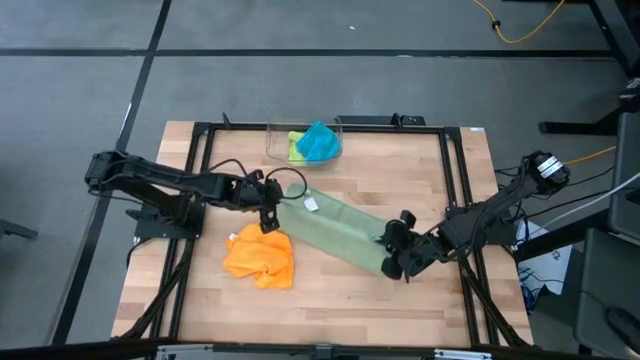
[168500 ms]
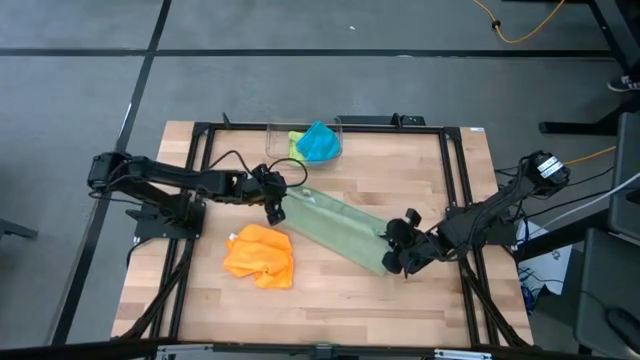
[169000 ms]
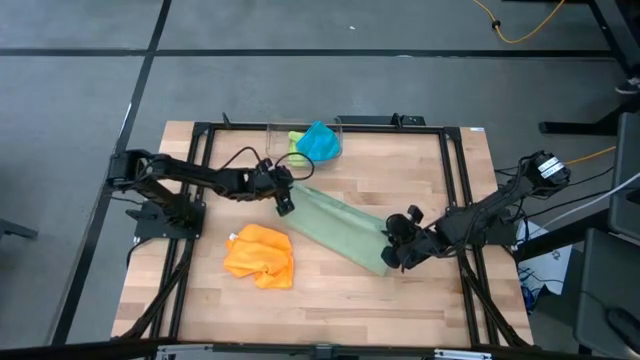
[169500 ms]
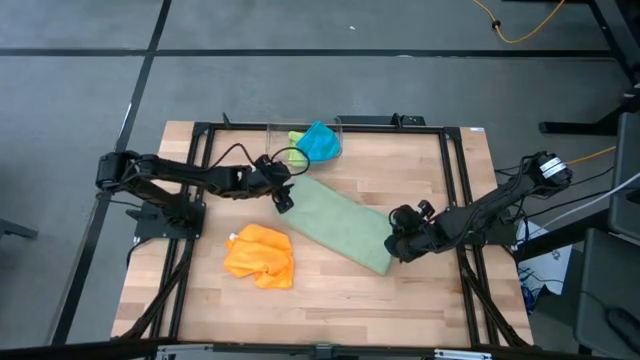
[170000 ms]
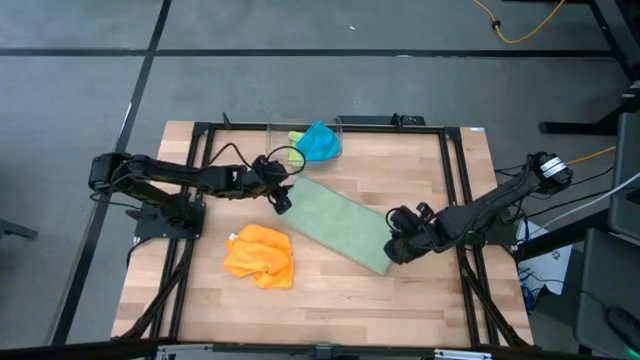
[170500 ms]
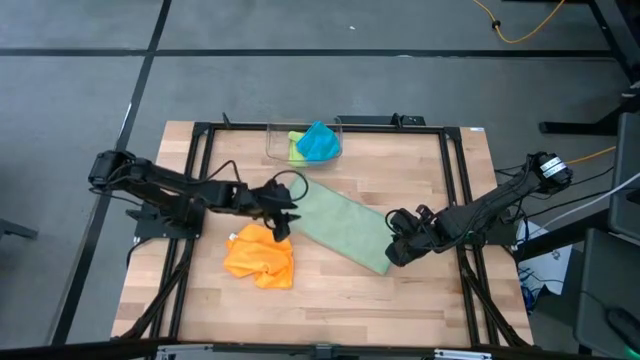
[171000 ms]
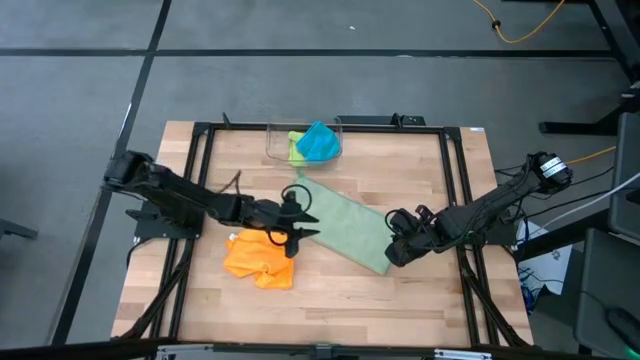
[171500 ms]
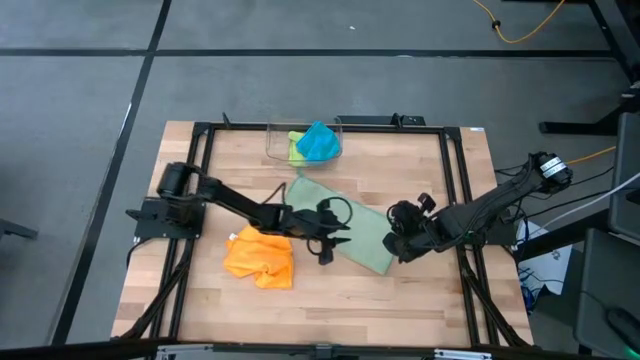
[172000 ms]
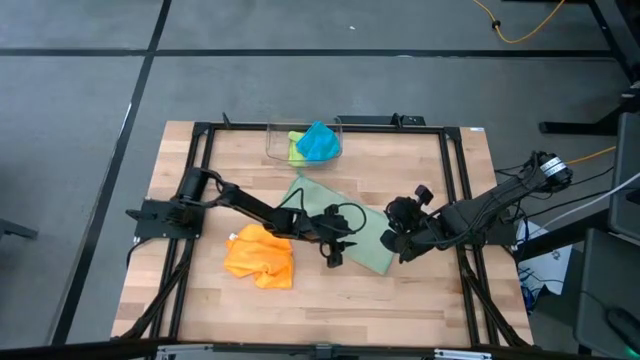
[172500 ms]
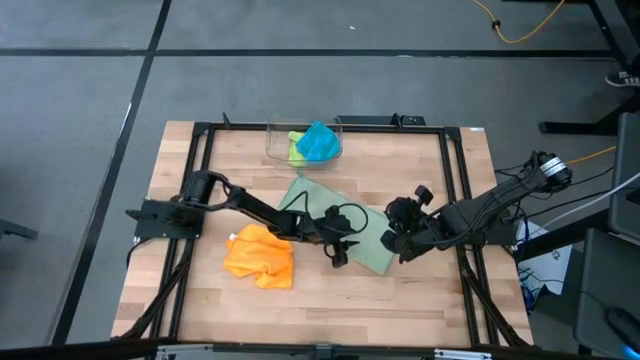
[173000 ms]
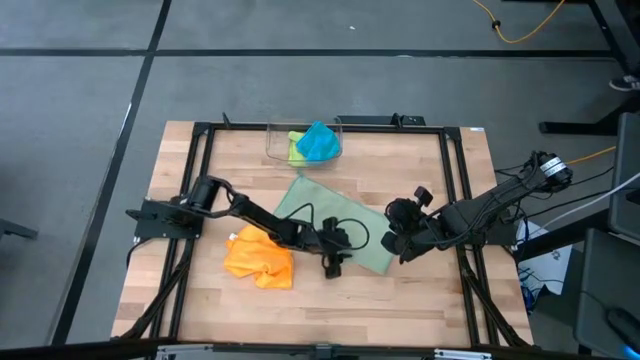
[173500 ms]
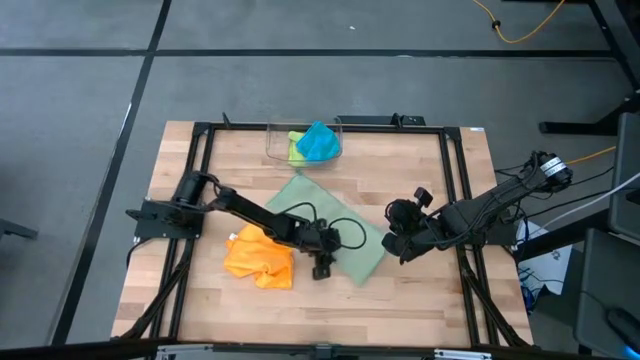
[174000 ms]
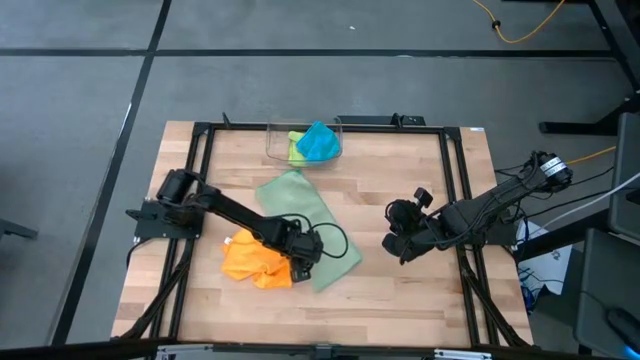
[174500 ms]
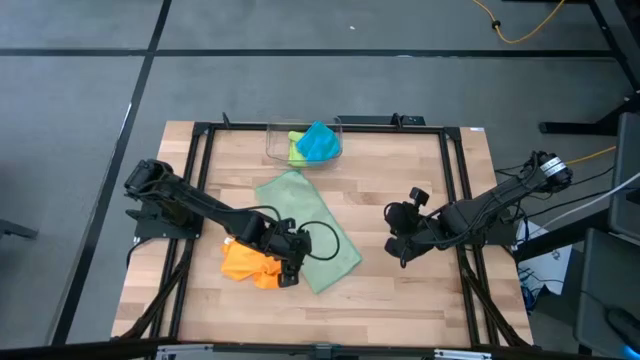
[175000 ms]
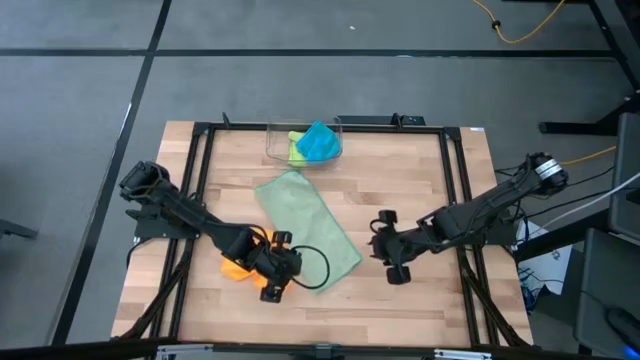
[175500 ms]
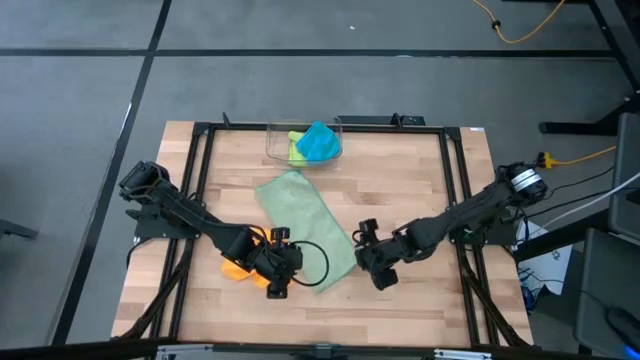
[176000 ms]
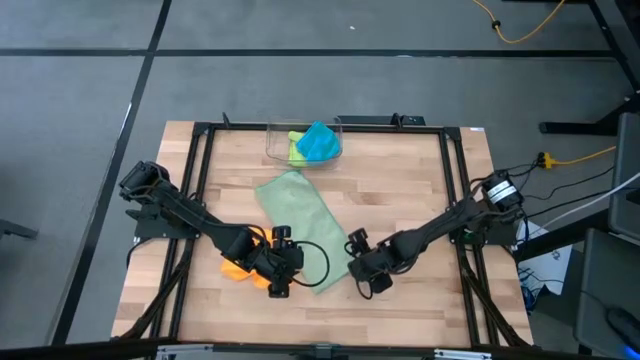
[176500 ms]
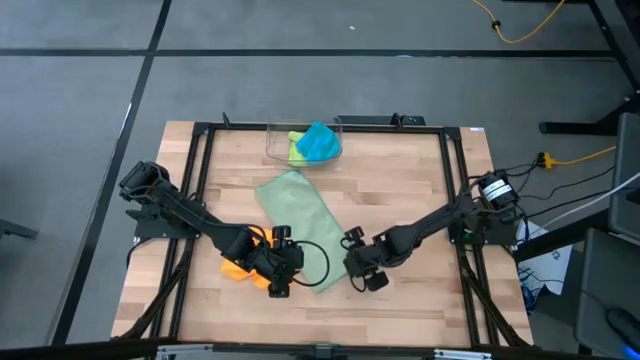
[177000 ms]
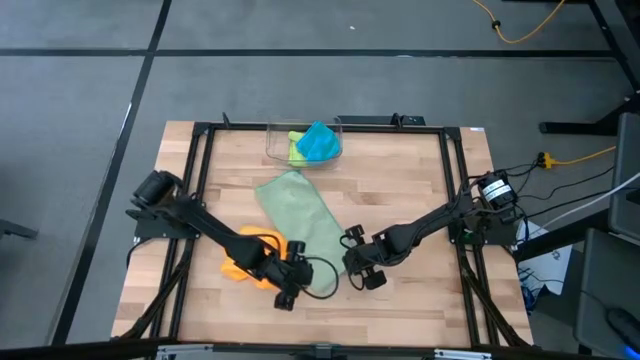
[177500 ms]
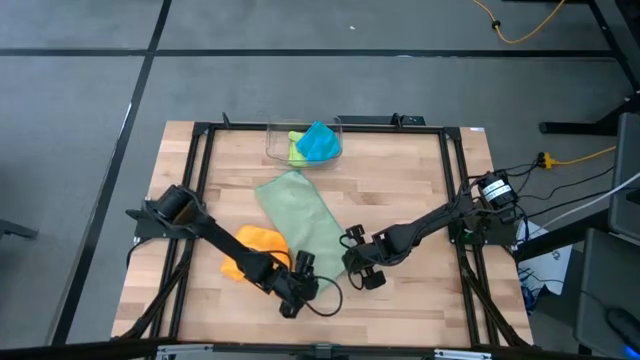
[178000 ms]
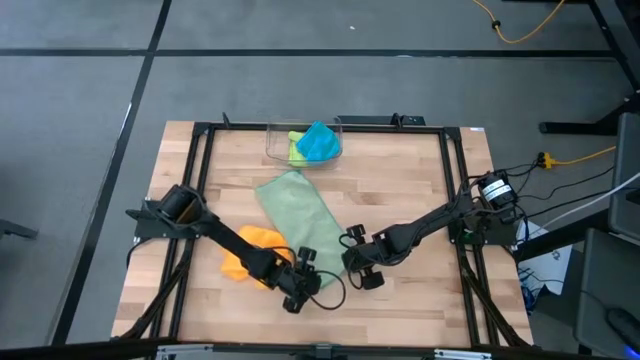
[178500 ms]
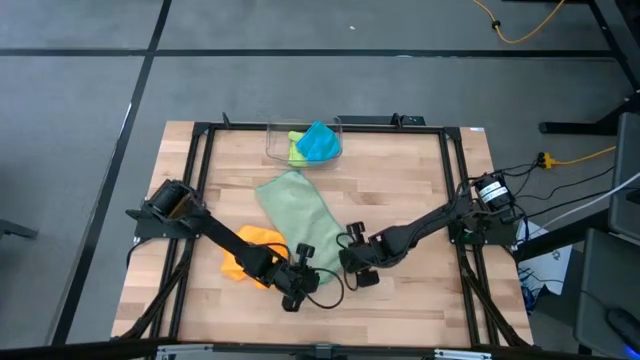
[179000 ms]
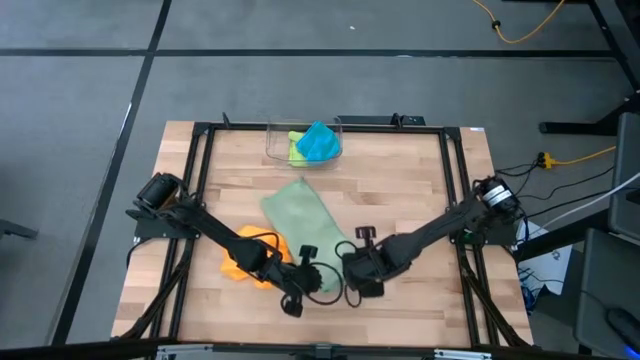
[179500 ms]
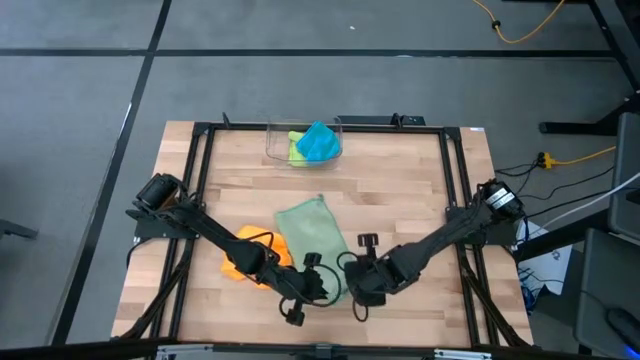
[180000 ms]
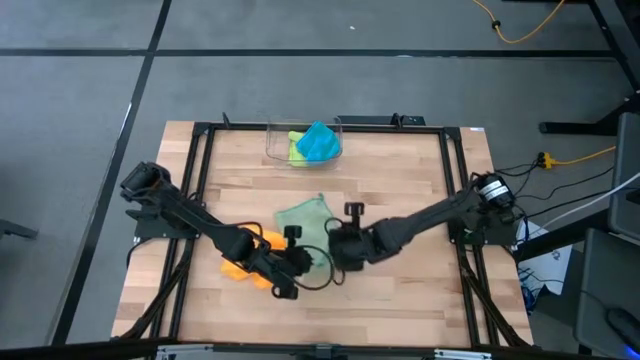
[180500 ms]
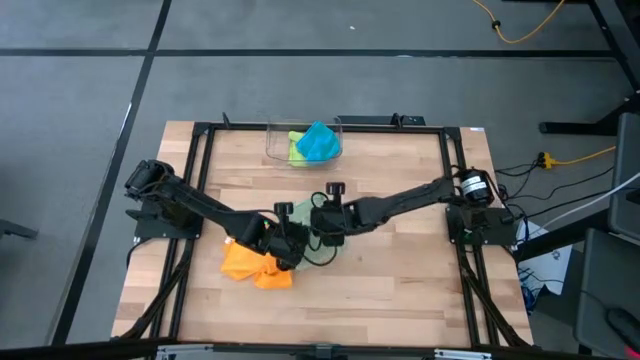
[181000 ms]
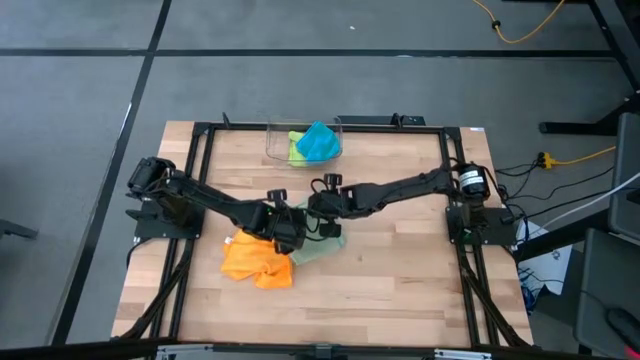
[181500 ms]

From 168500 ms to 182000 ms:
Task: Fold microfiber towels
Fold the green towel

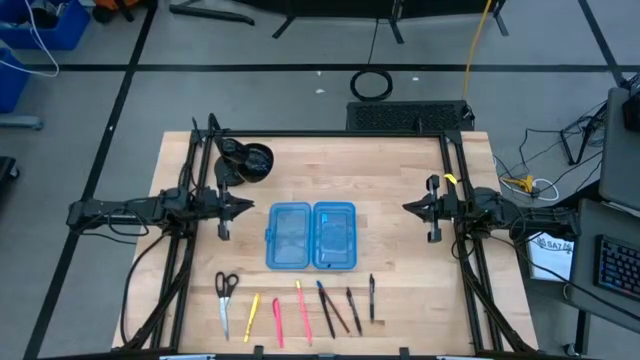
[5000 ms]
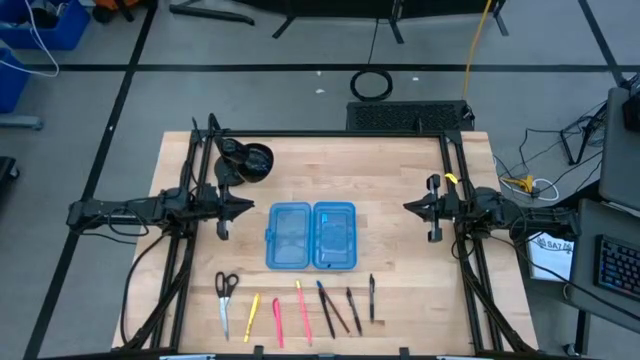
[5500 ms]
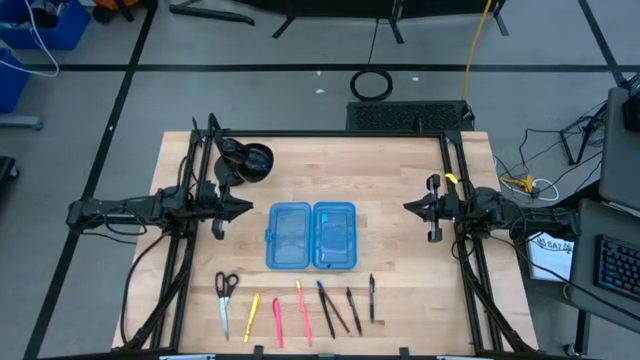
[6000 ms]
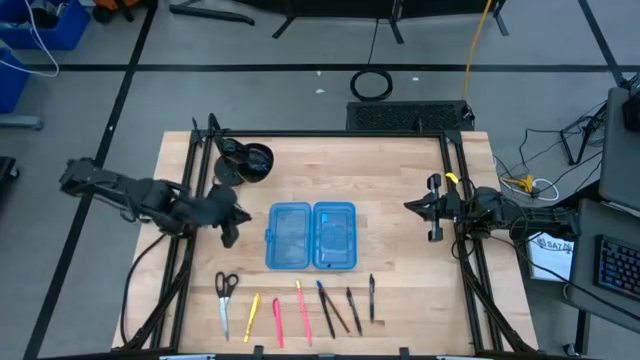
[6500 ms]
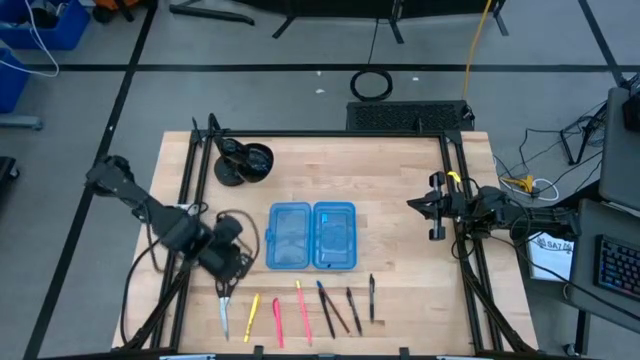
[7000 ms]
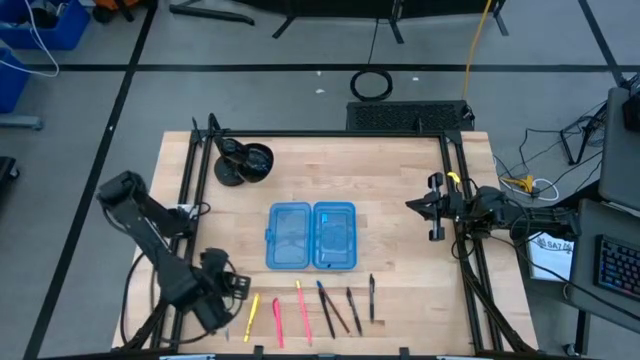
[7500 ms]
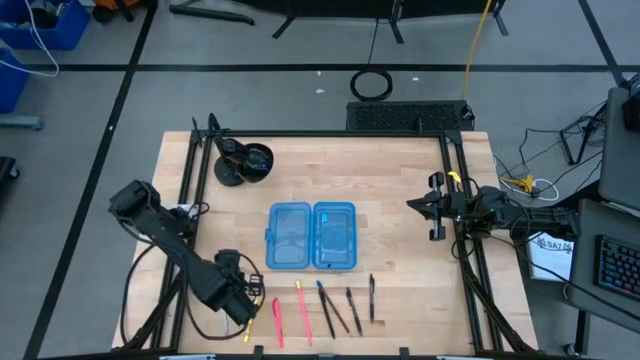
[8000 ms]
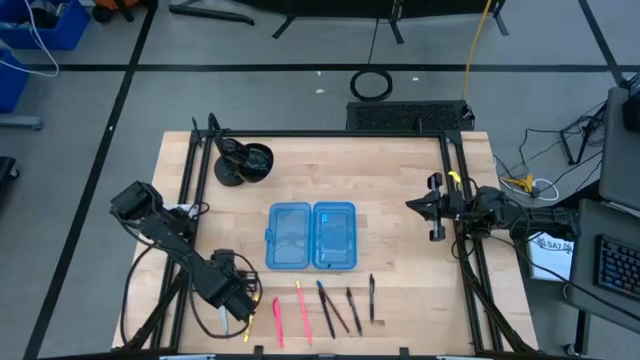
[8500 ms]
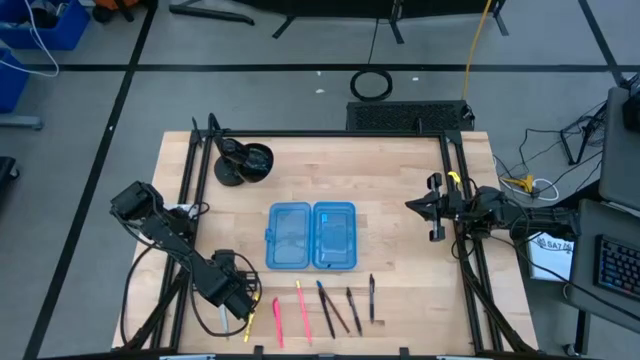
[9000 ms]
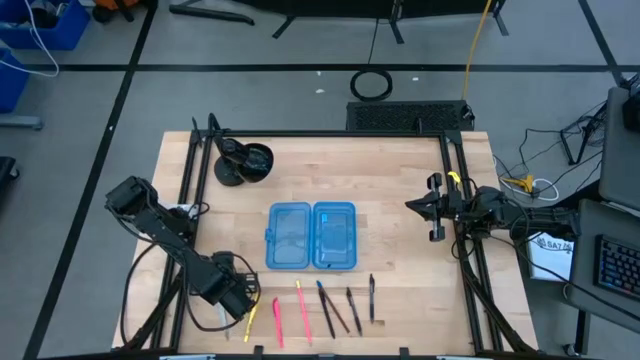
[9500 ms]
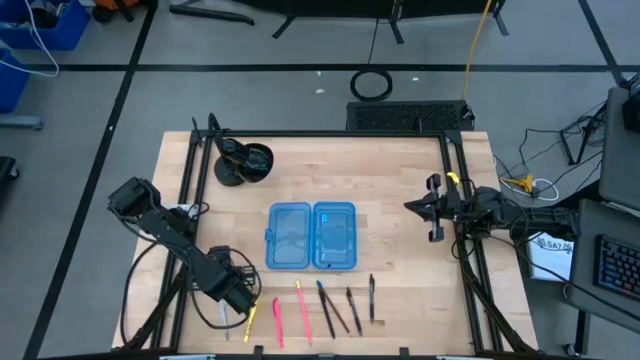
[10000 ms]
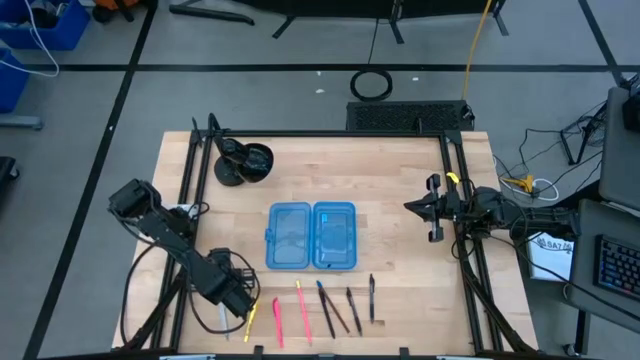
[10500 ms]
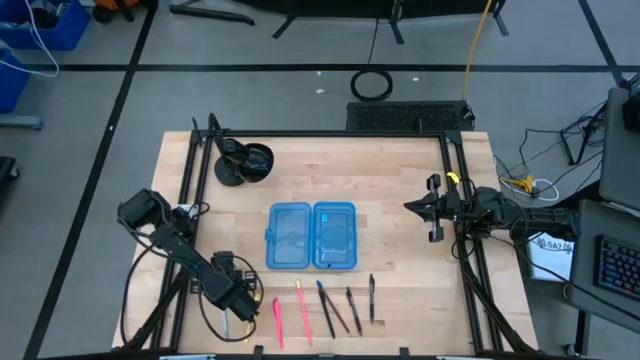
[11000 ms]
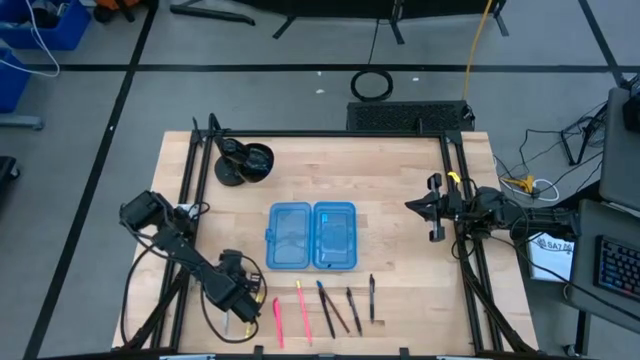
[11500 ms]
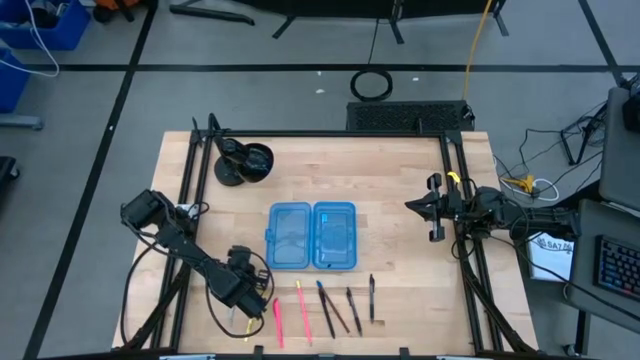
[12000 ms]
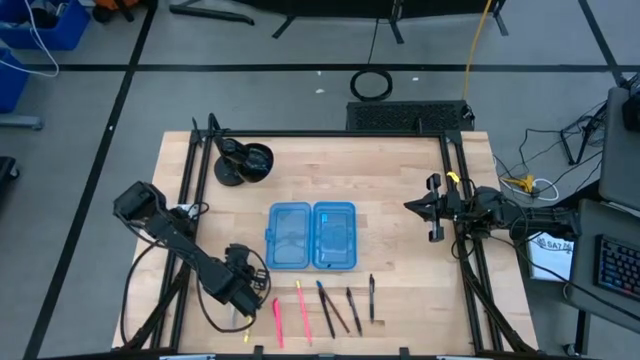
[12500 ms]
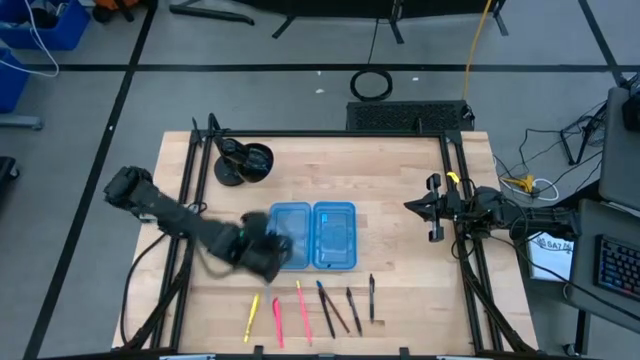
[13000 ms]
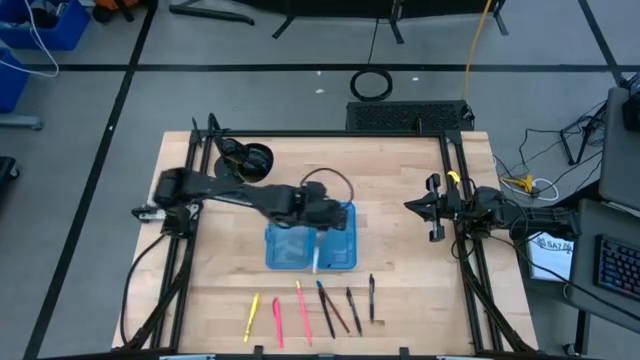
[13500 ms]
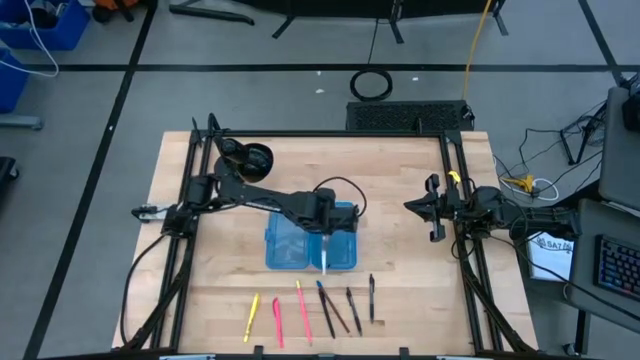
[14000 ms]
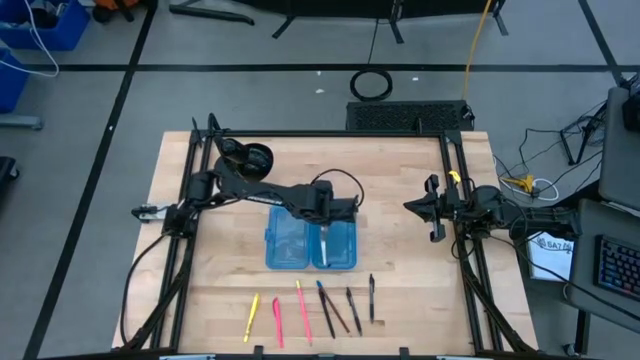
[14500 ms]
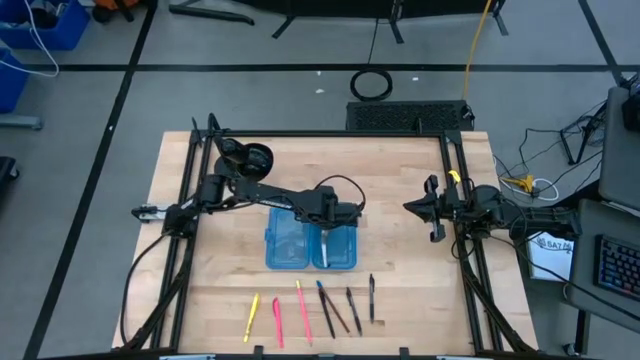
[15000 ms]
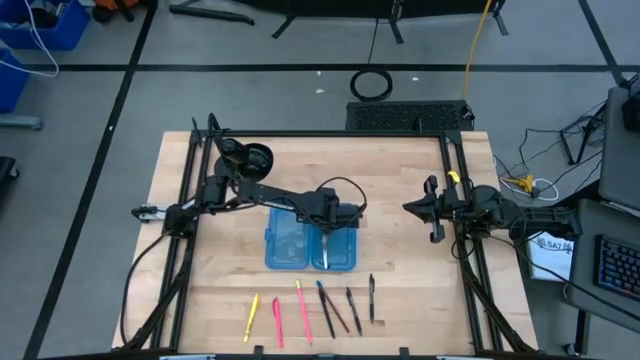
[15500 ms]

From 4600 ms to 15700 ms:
Task: Pick & place school supplies into a supply box
Put the black scissors into the blue supply box
